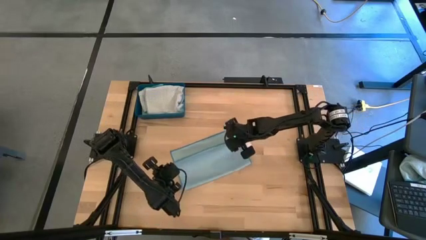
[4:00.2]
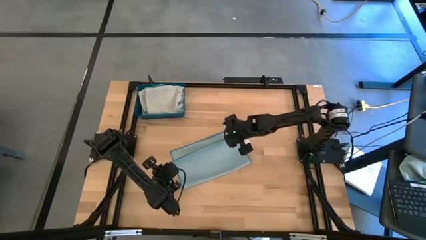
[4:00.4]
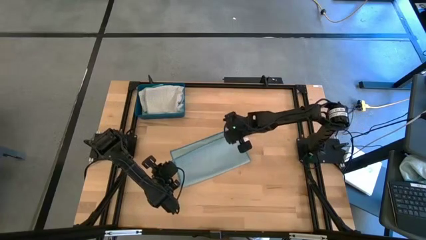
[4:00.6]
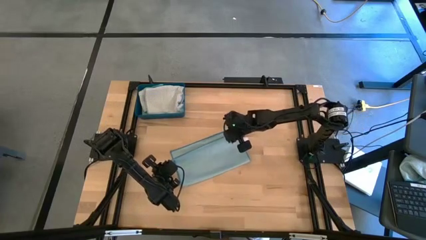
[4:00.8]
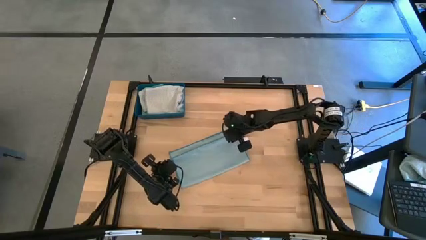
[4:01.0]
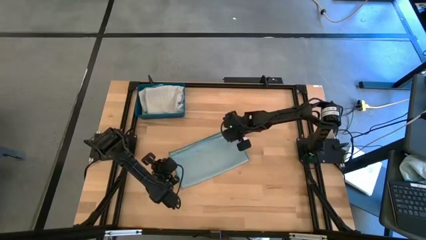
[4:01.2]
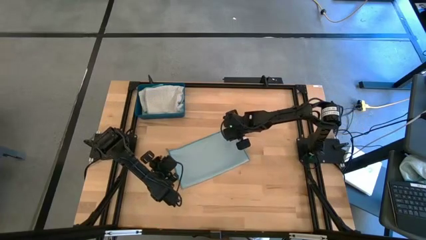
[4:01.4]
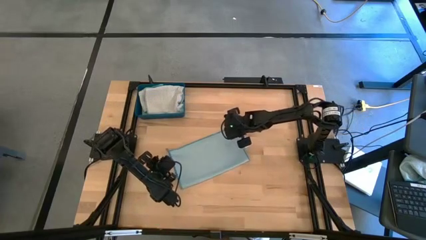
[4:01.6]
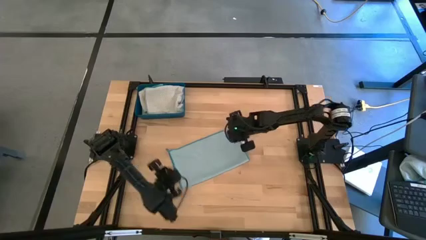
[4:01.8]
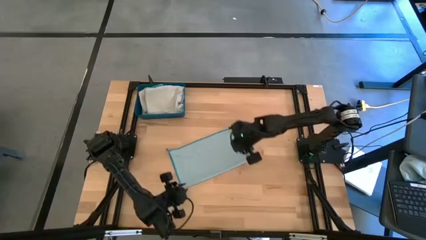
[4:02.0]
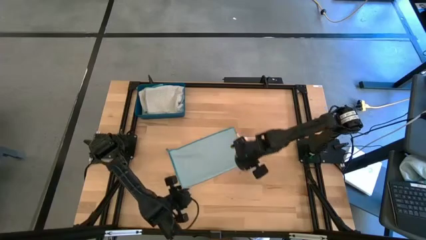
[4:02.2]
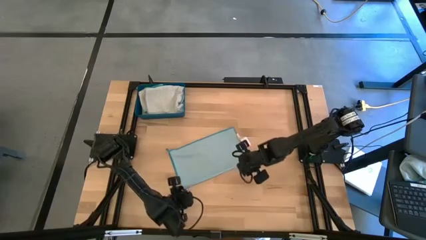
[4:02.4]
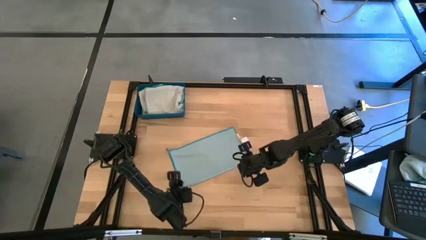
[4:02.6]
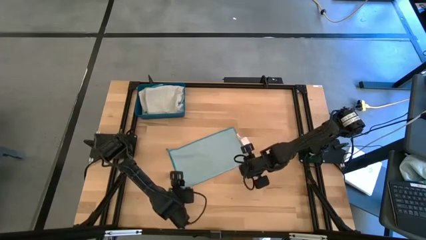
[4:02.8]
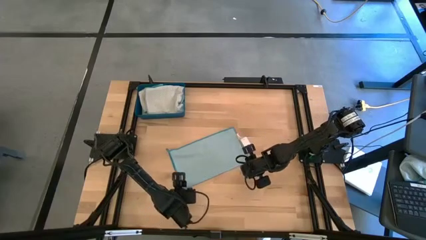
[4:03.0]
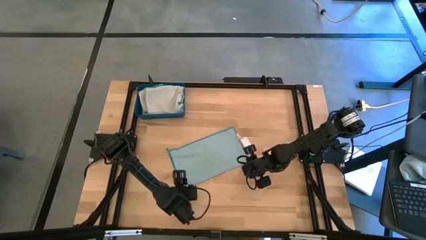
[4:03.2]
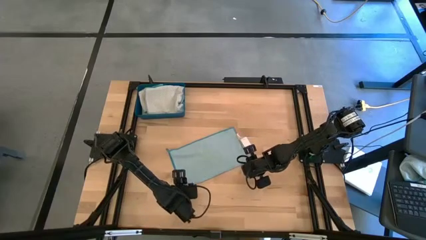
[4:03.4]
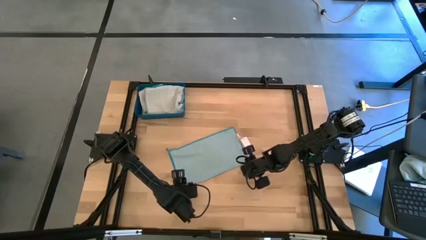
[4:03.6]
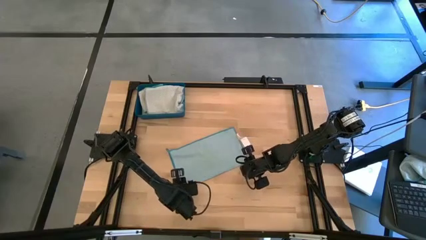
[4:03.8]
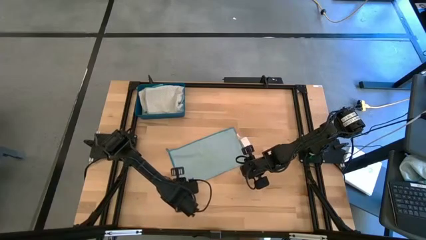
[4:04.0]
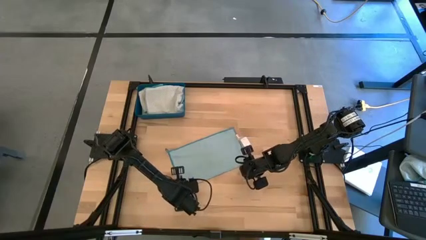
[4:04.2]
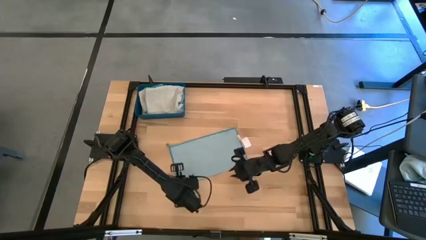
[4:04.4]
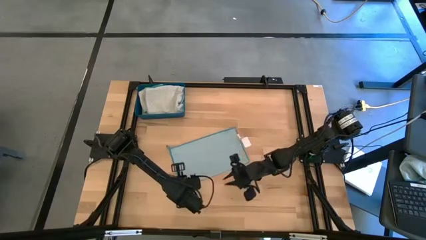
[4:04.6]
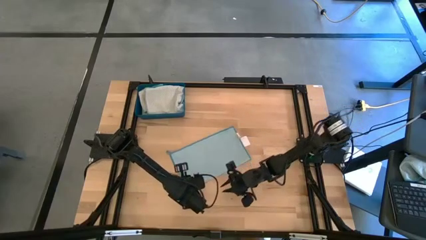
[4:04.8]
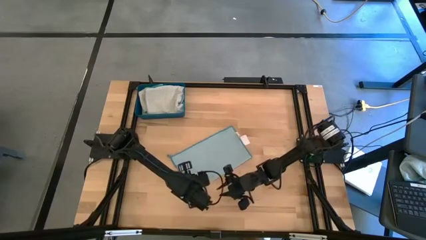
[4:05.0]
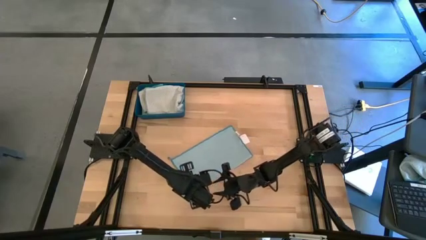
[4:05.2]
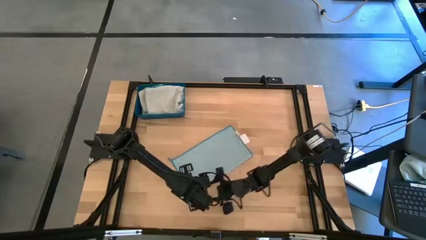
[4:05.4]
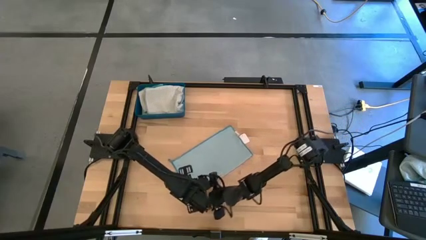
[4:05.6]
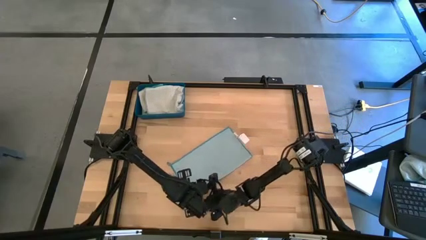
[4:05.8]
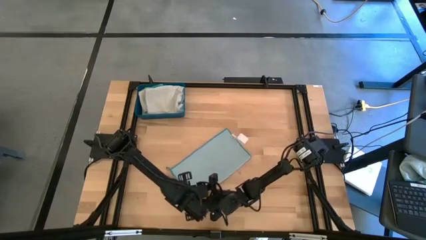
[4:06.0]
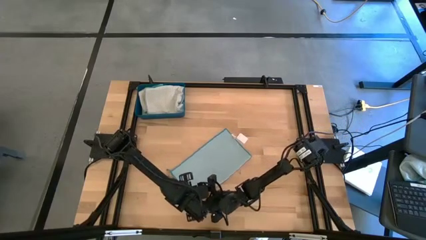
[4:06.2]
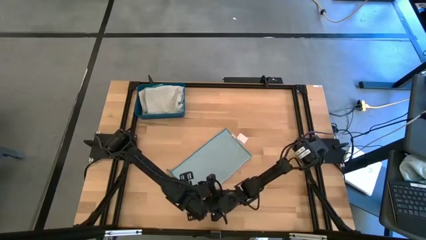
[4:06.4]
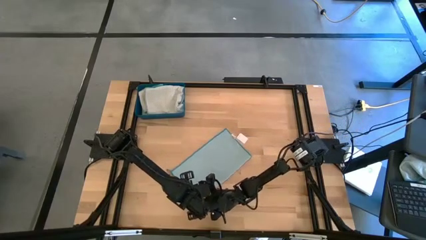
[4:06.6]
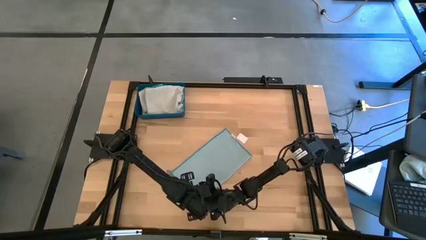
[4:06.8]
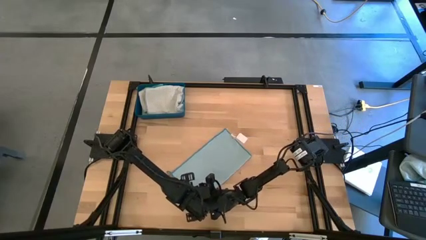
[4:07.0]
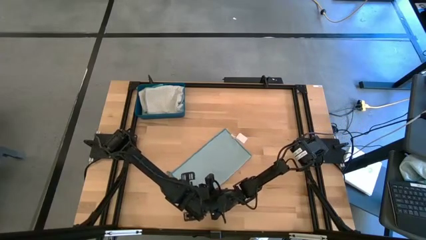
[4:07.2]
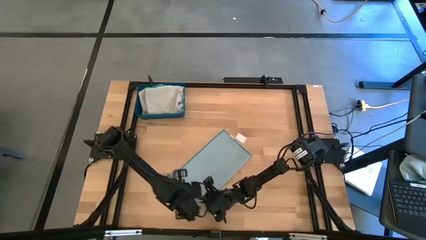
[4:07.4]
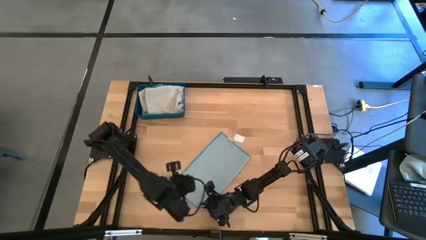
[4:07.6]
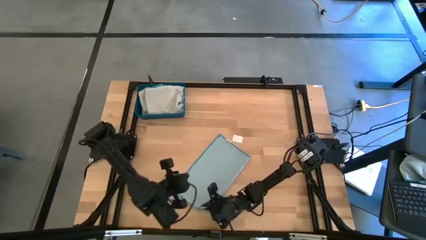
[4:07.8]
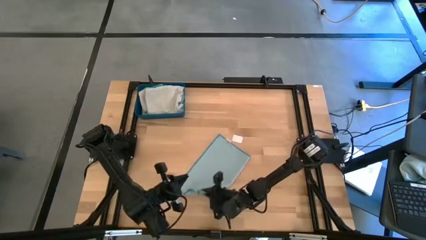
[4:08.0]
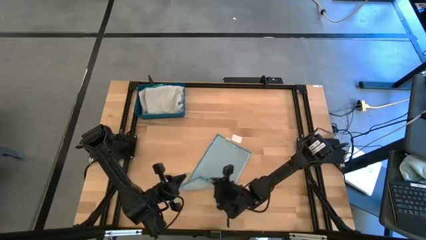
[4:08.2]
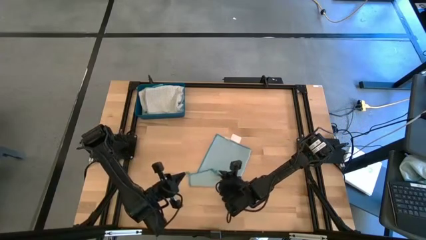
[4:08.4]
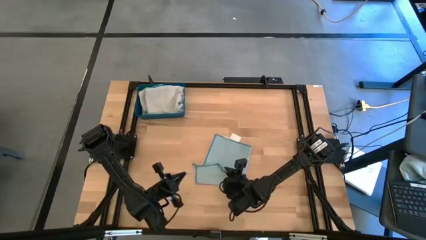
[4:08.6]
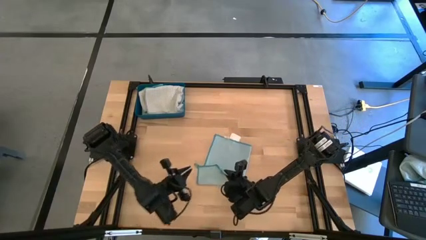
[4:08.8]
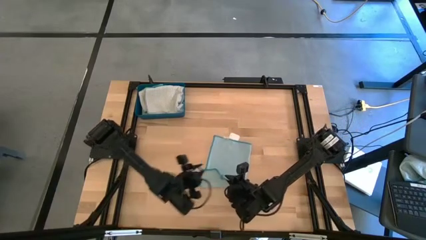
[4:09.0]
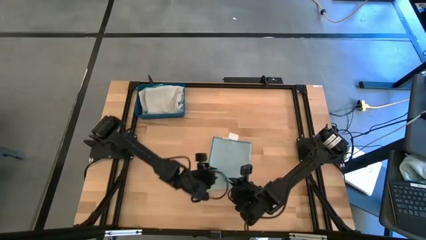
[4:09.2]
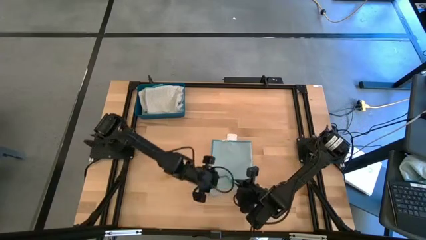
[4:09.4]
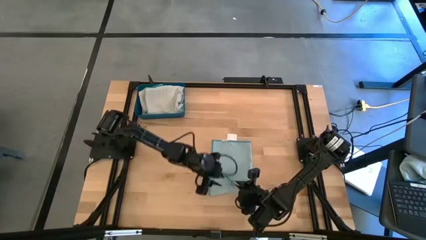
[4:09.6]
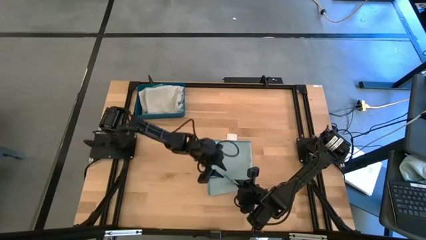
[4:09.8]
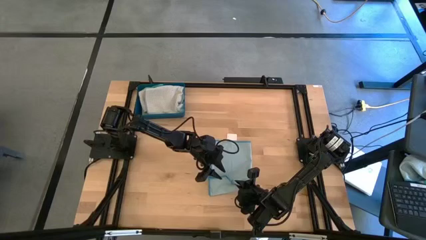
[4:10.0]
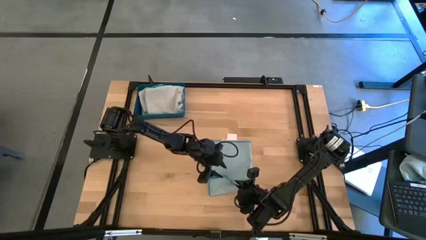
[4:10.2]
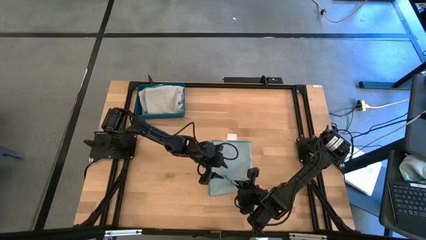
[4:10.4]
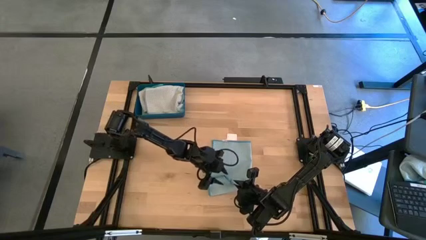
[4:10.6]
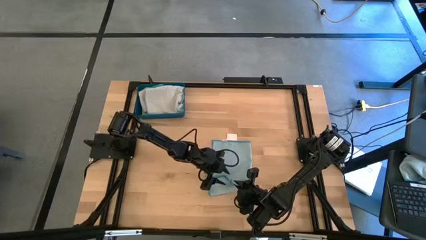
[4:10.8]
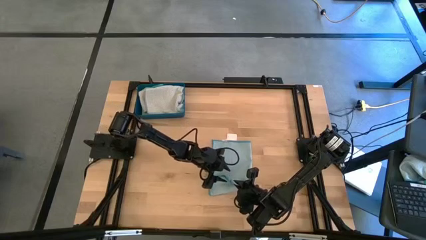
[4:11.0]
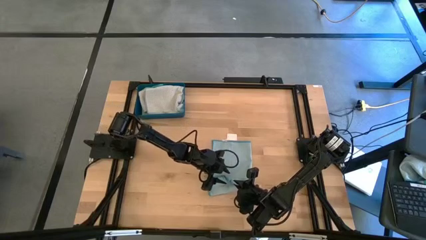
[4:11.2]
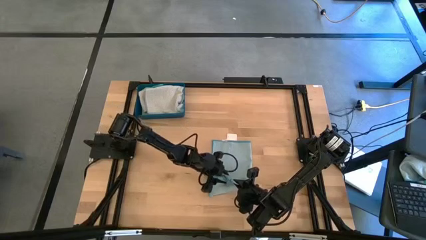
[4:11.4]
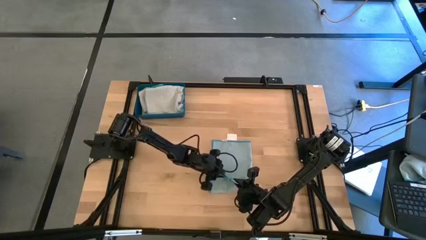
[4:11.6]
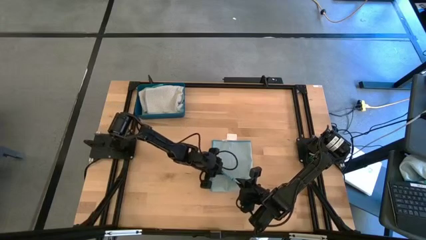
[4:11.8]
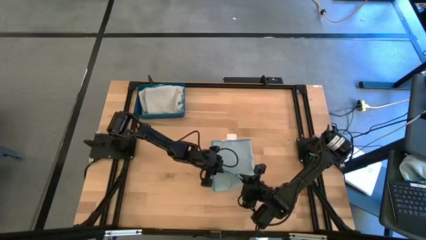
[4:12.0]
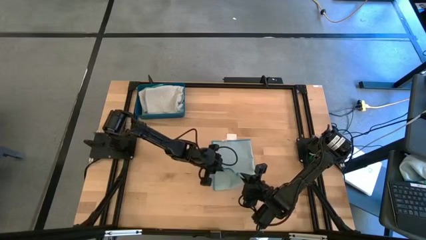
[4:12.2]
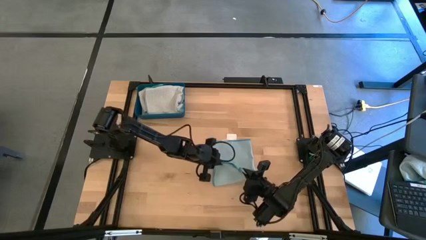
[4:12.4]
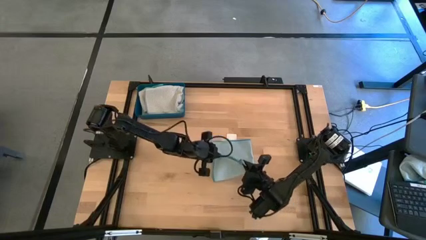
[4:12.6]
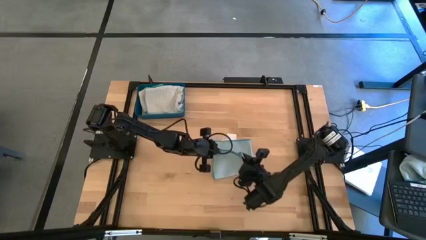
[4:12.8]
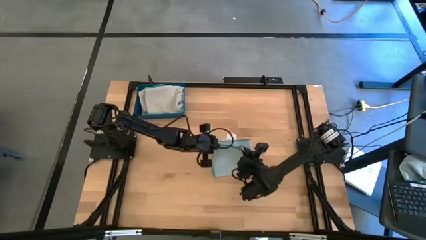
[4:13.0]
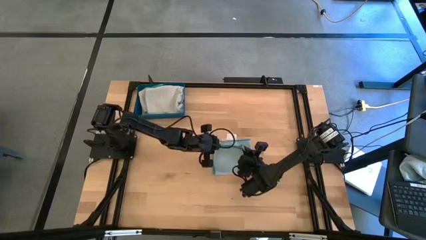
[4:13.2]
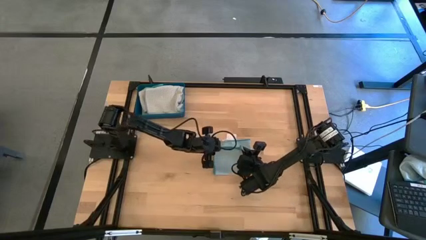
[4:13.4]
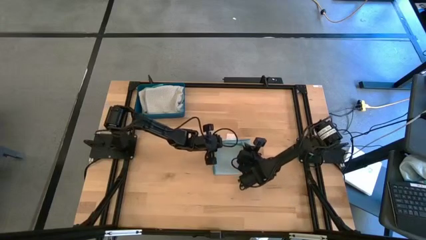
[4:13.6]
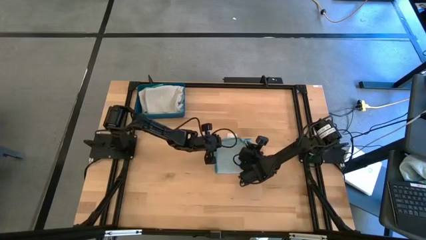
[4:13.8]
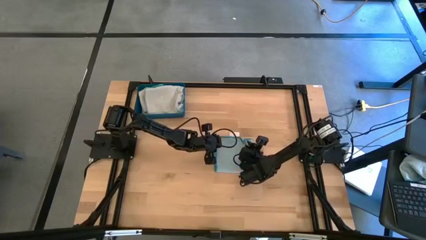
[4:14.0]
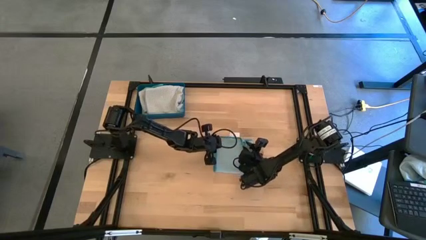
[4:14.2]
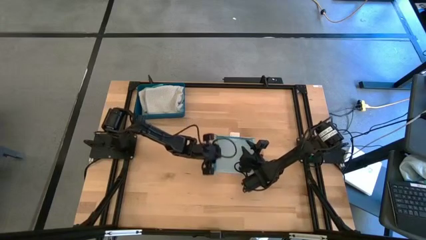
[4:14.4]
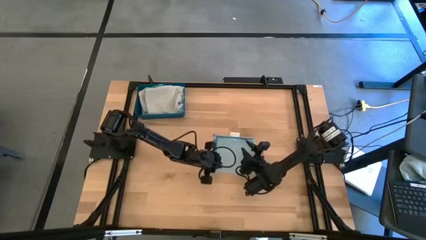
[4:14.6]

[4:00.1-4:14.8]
Task: Fold microfiber towels
Fold the light blue towel
